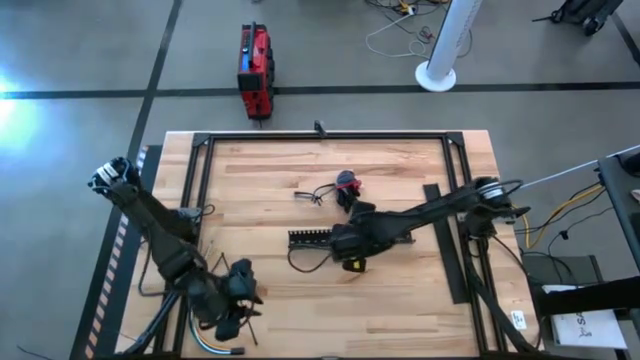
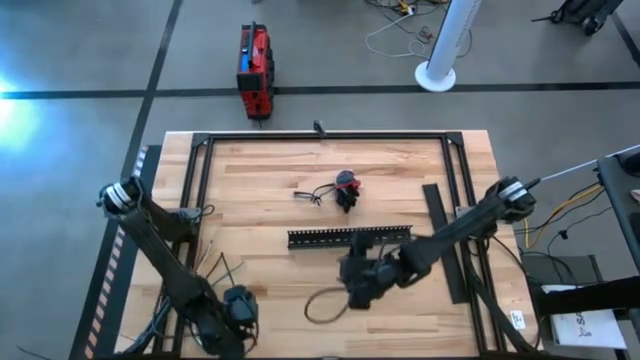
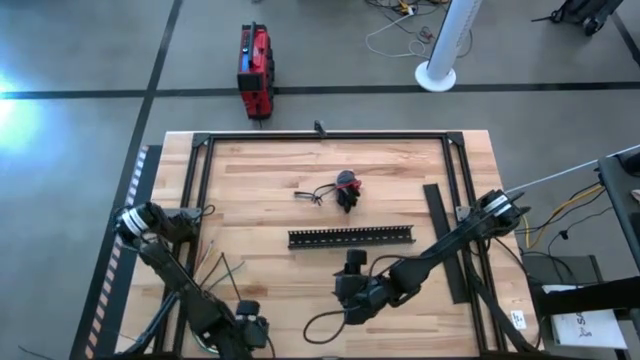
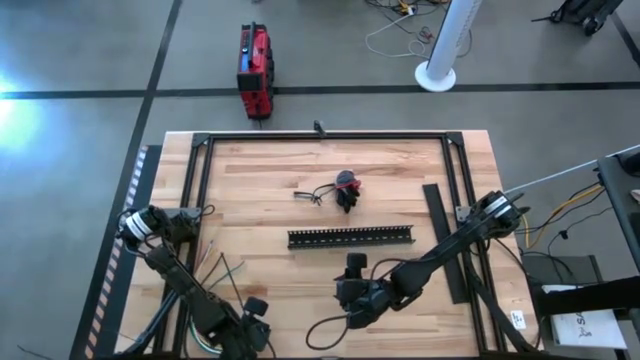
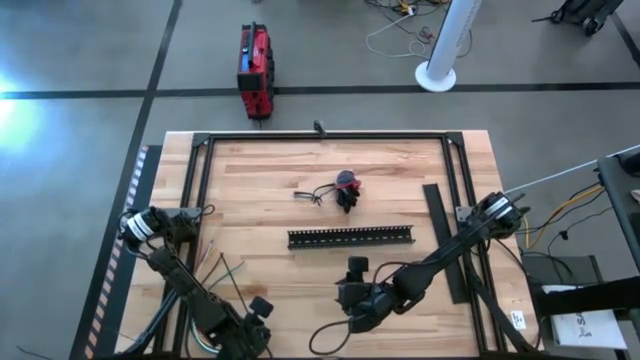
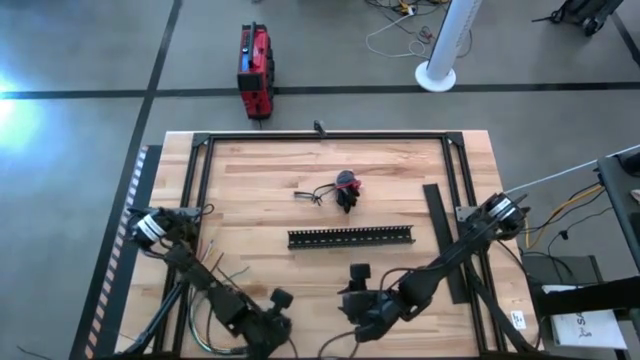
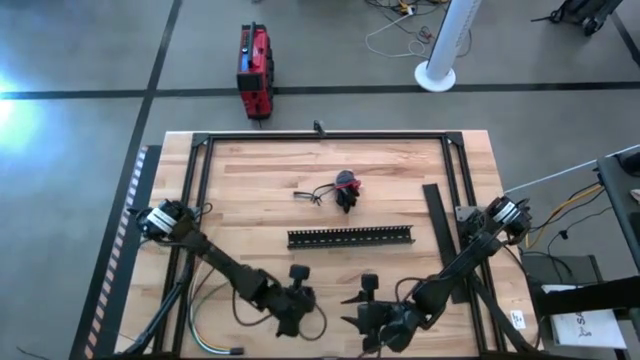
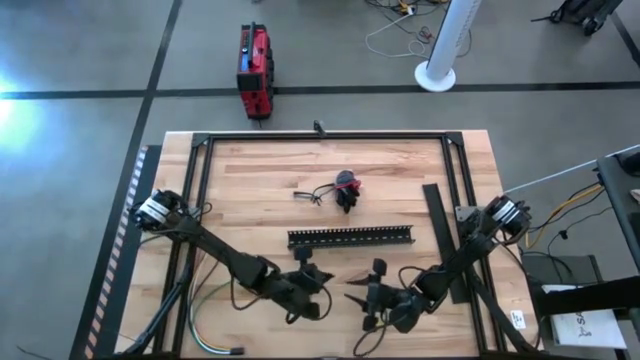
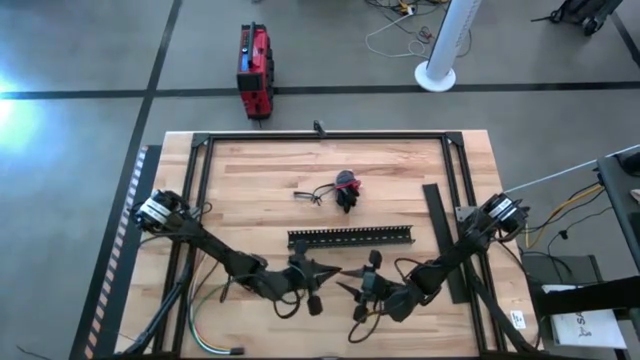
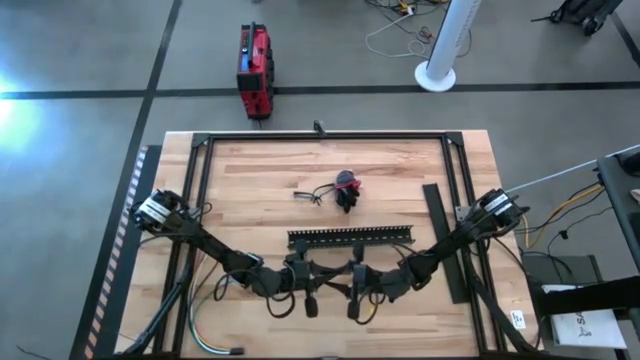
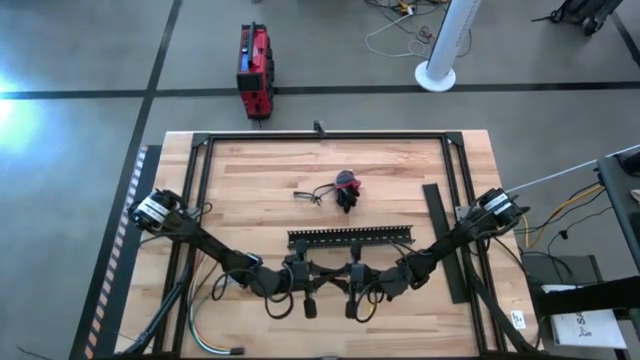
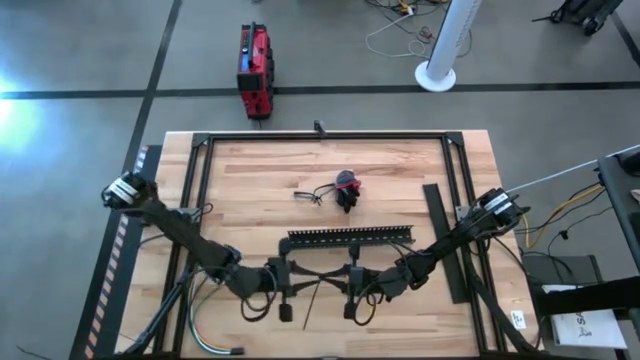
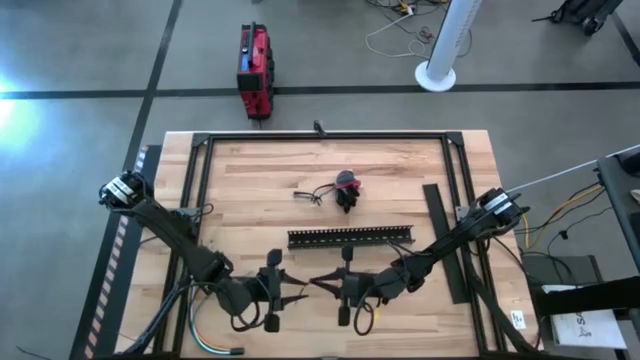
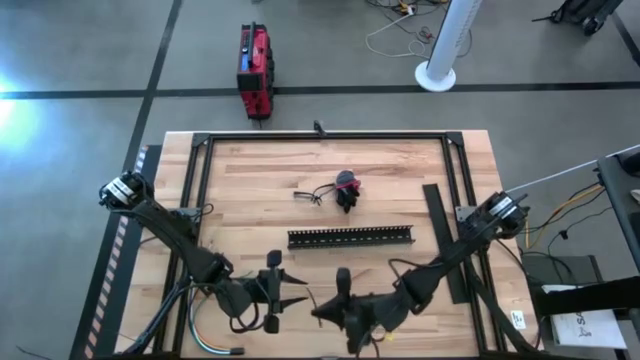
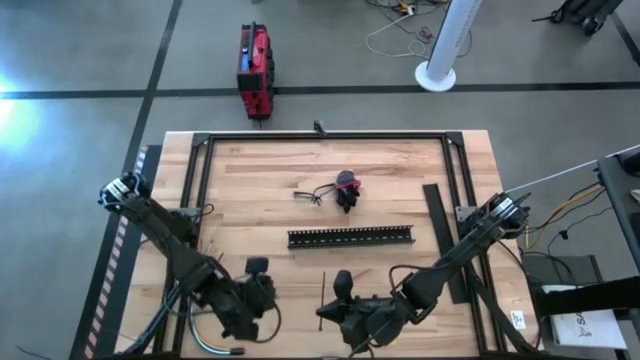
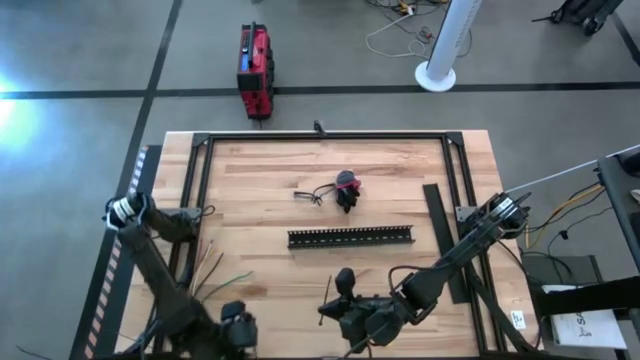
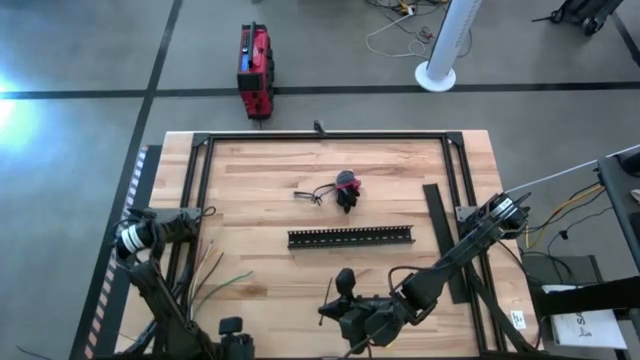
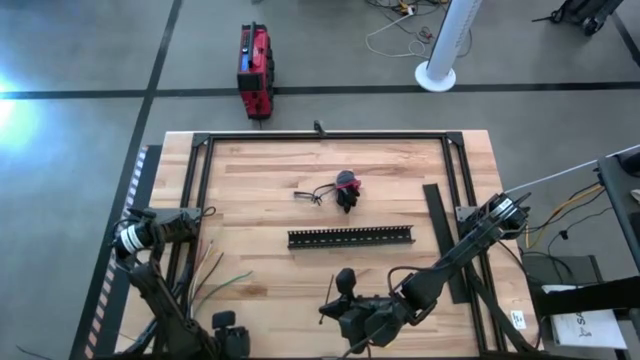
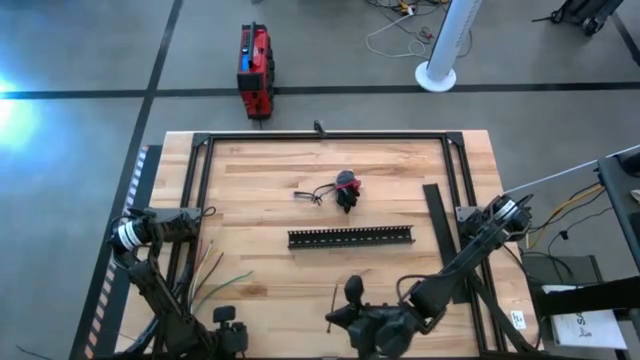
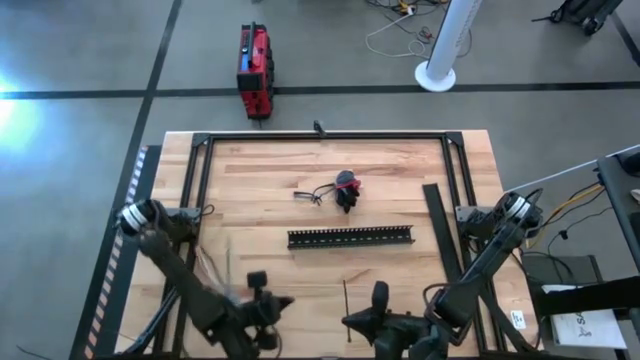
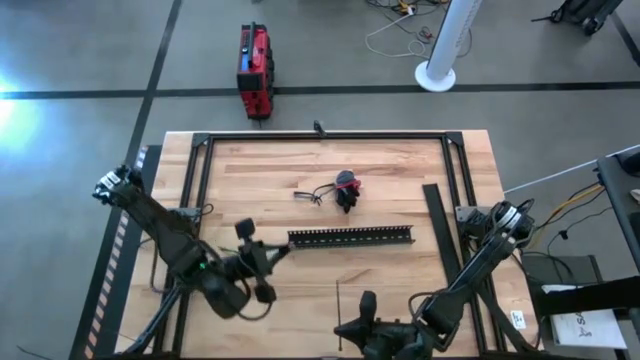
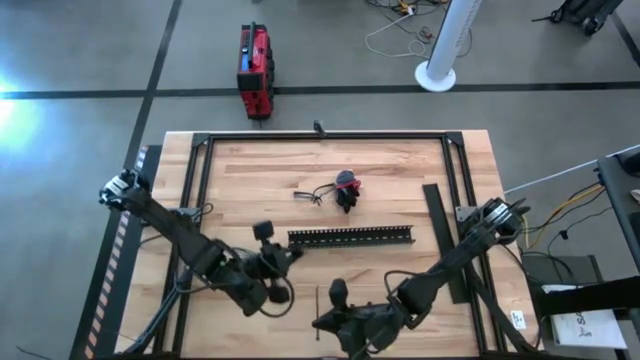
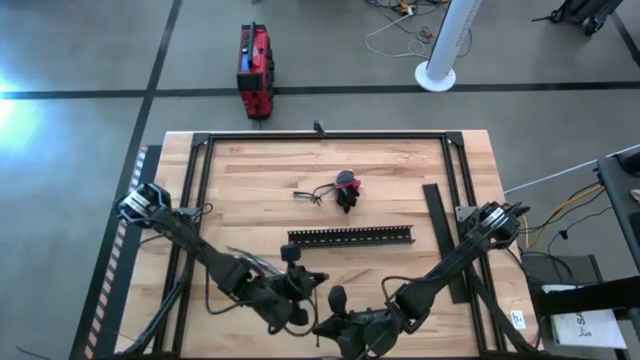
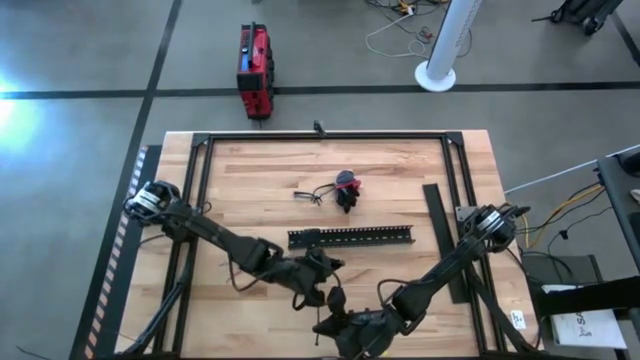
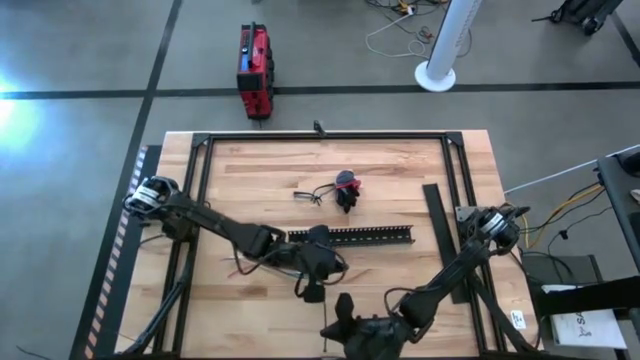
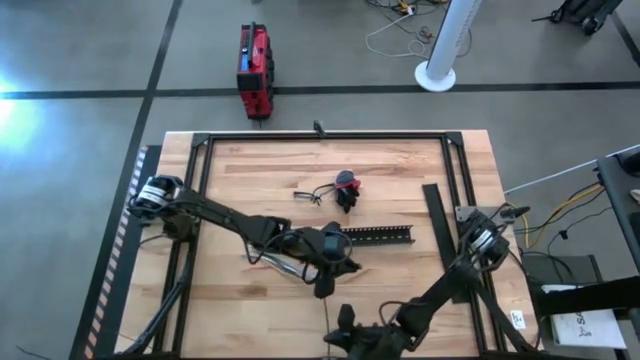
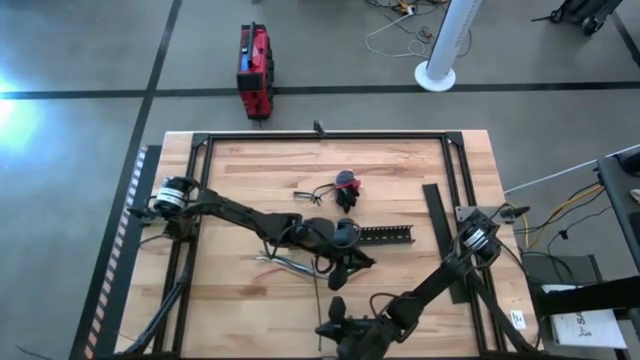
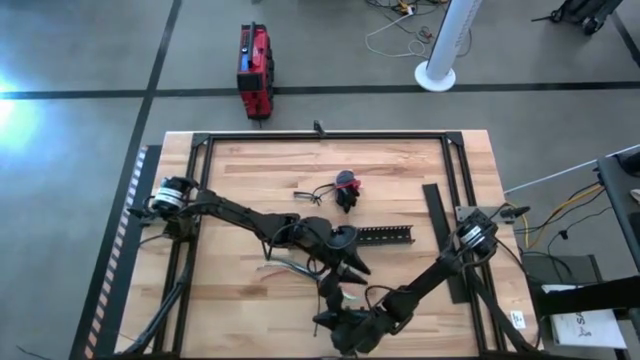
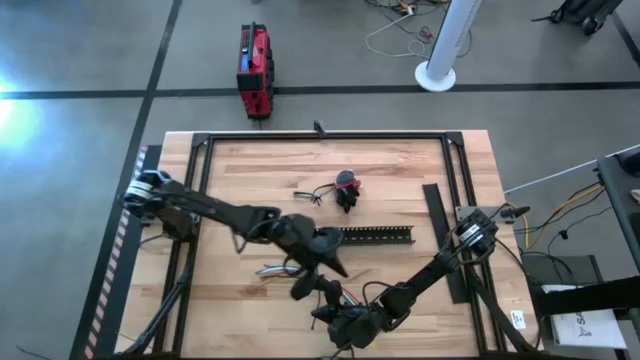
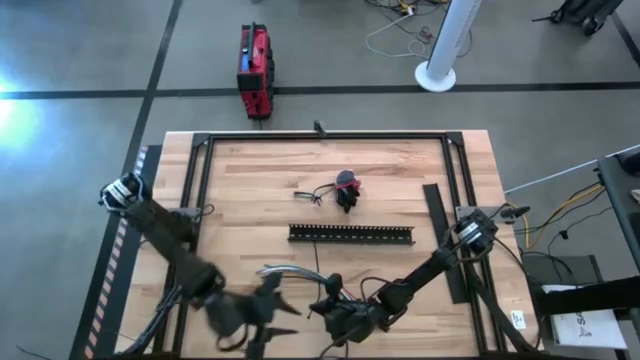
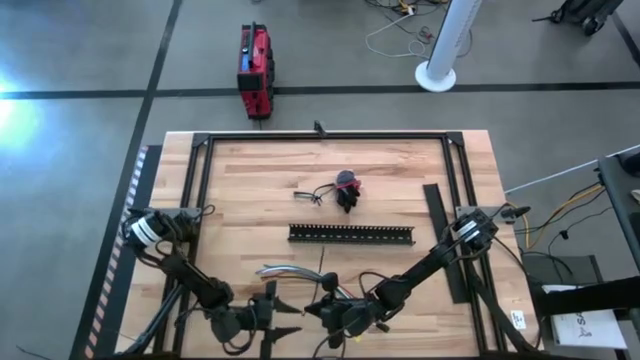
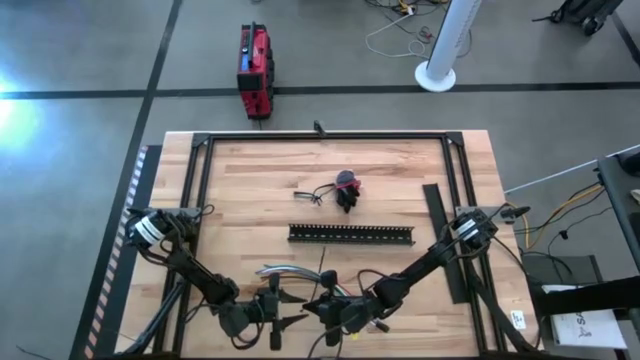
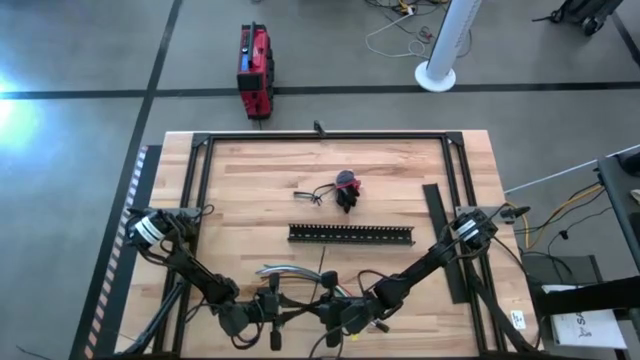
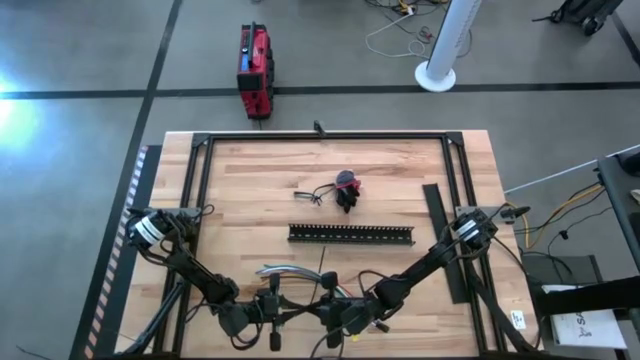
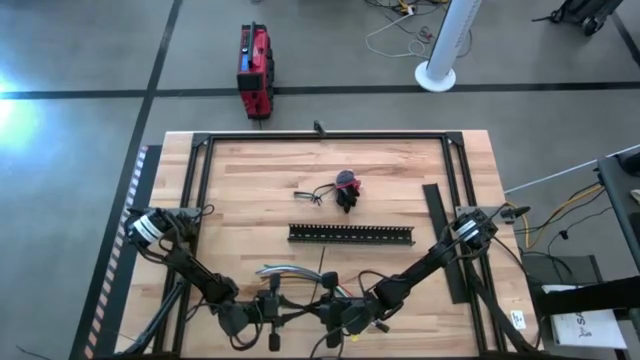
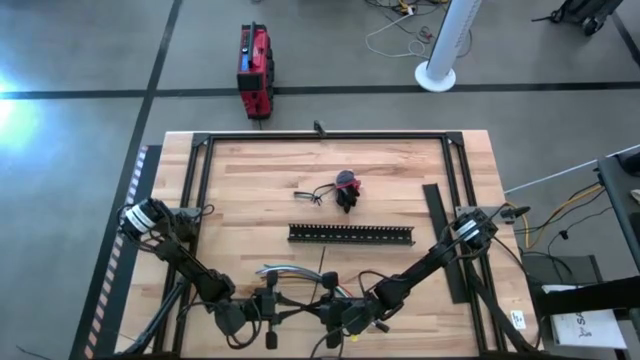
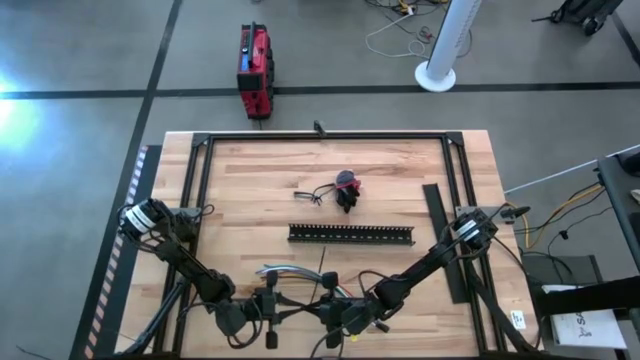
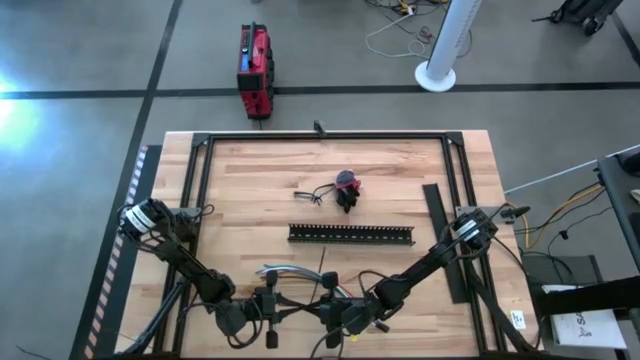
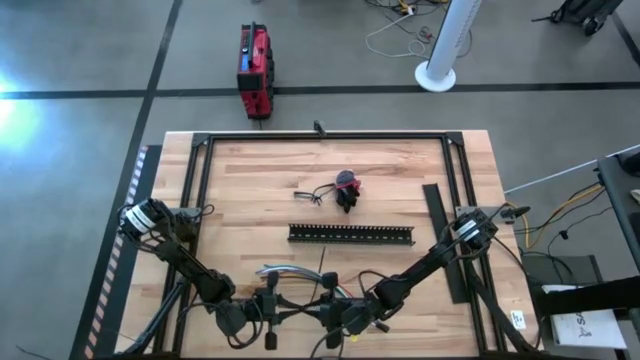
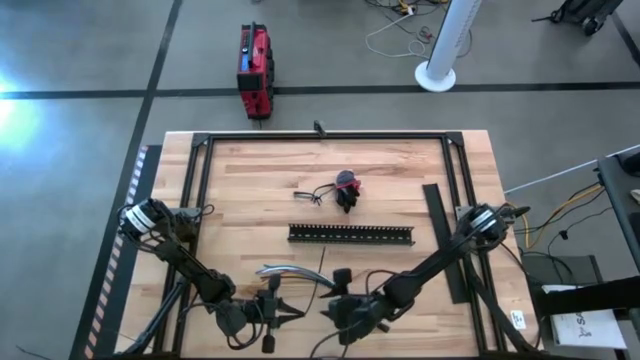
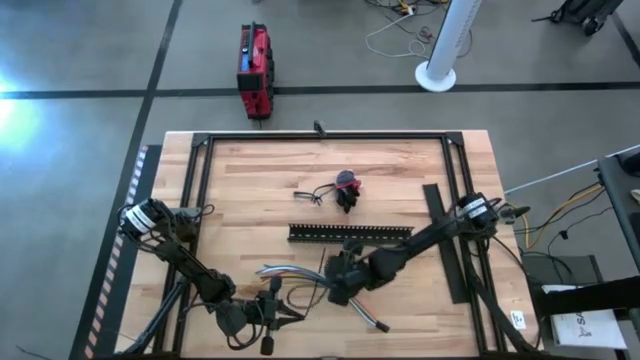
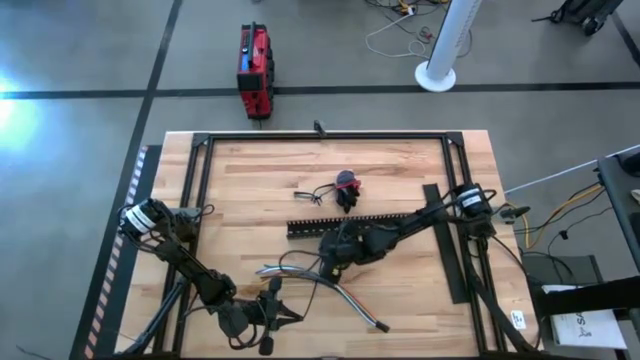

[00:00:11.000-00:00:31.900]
Task: Ziptie cables
Wrap the cable wires with black zip tie
